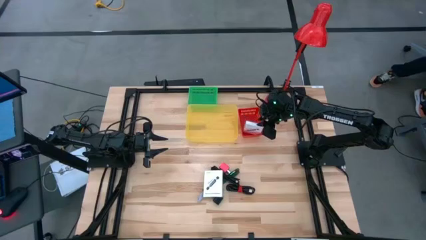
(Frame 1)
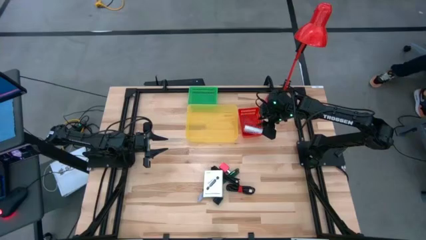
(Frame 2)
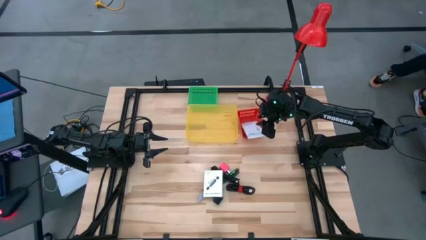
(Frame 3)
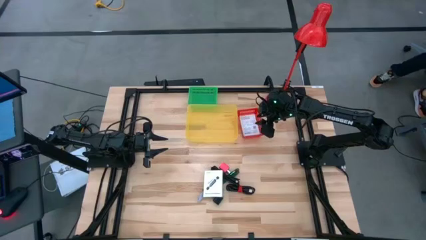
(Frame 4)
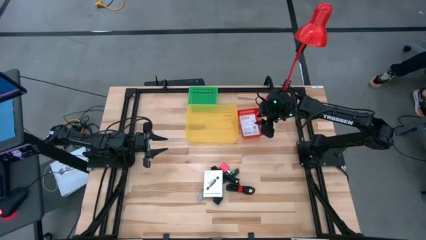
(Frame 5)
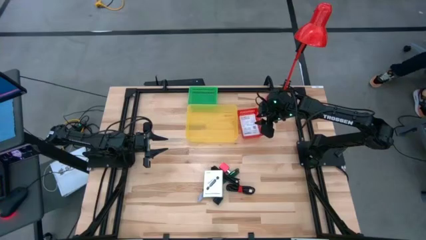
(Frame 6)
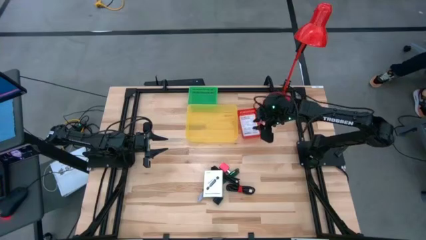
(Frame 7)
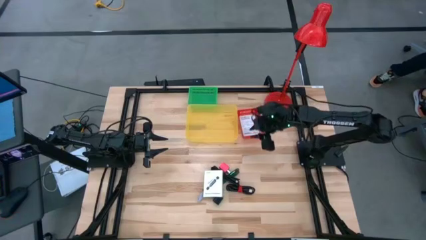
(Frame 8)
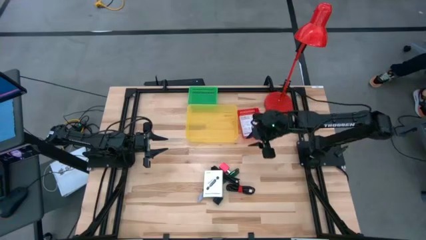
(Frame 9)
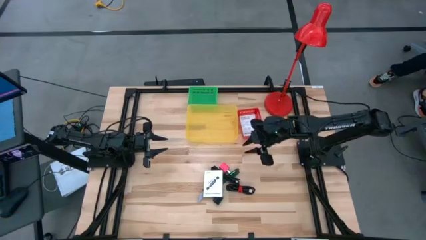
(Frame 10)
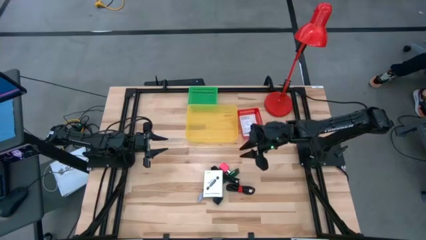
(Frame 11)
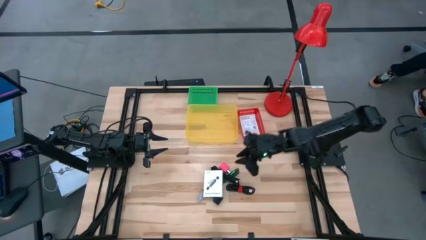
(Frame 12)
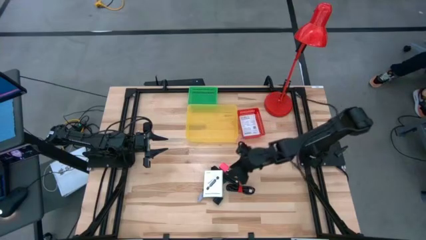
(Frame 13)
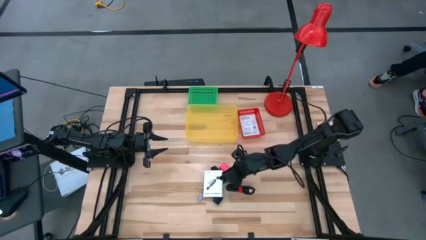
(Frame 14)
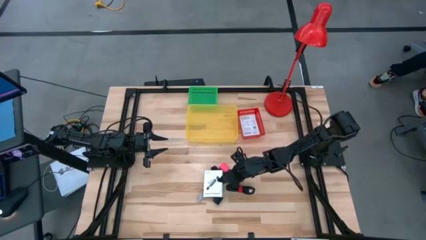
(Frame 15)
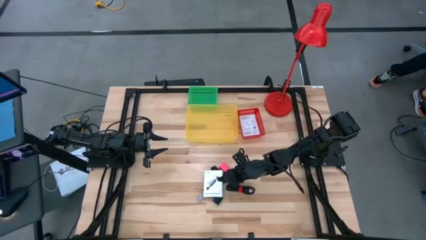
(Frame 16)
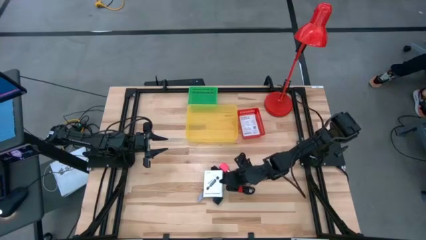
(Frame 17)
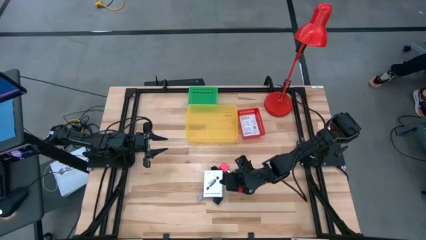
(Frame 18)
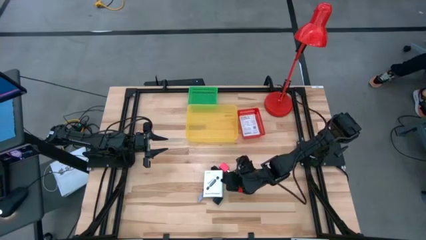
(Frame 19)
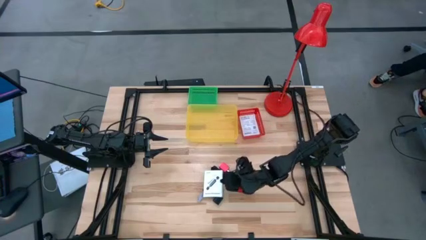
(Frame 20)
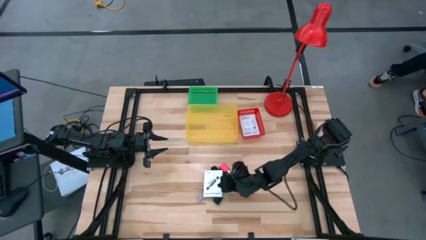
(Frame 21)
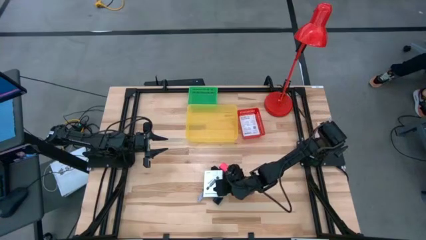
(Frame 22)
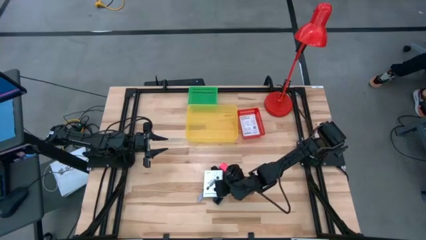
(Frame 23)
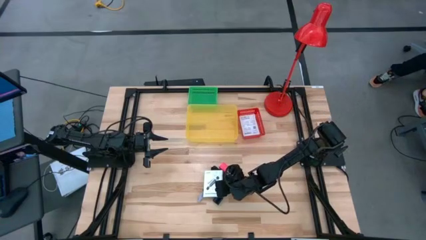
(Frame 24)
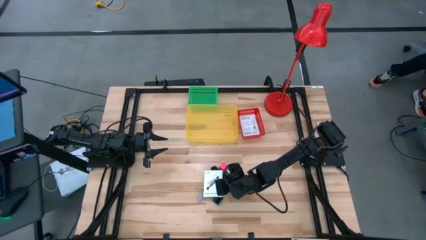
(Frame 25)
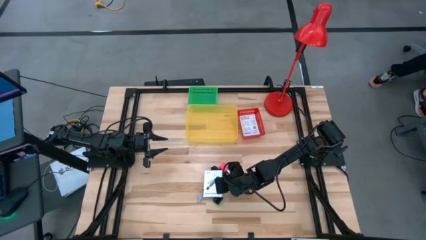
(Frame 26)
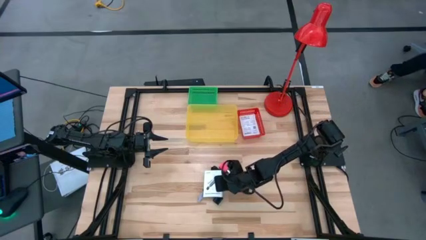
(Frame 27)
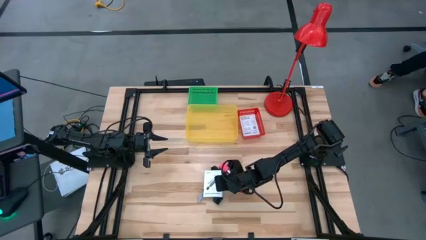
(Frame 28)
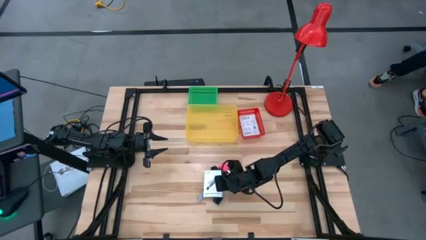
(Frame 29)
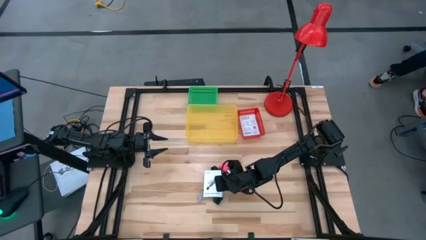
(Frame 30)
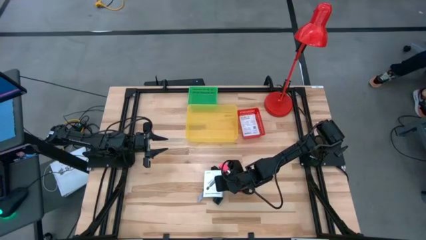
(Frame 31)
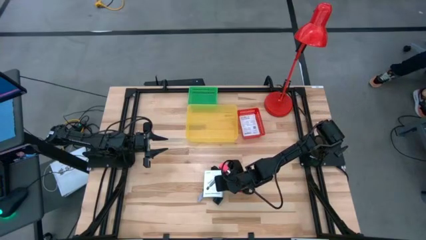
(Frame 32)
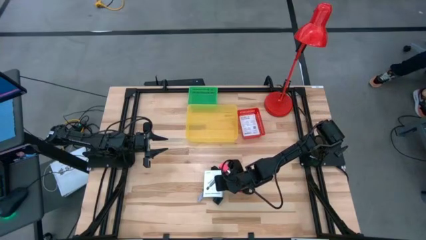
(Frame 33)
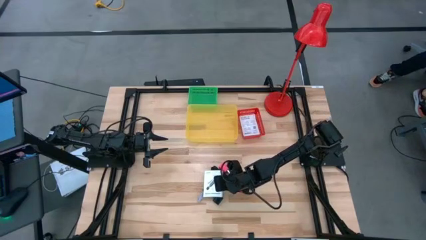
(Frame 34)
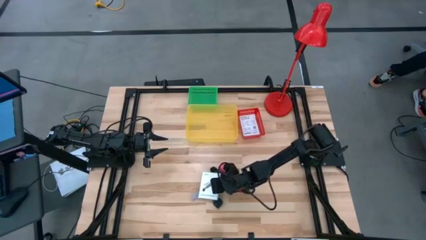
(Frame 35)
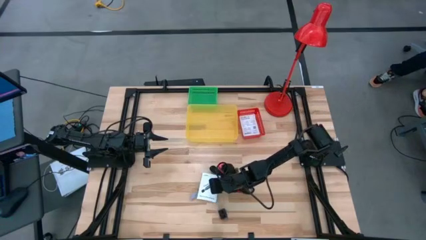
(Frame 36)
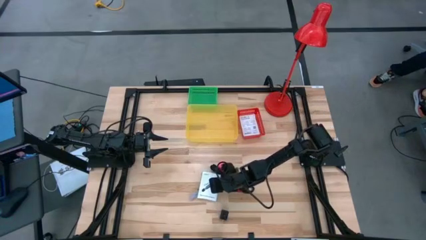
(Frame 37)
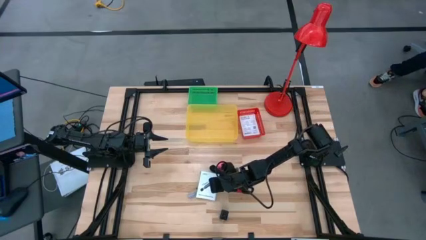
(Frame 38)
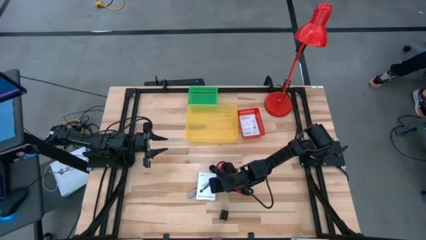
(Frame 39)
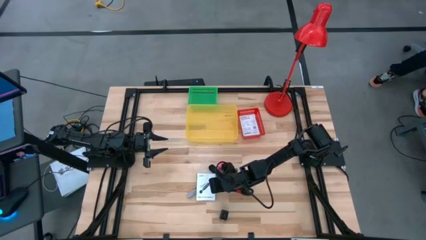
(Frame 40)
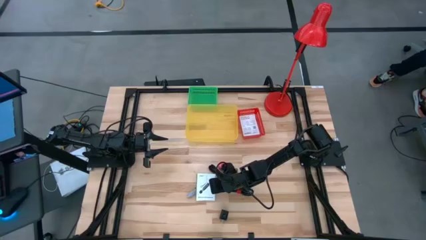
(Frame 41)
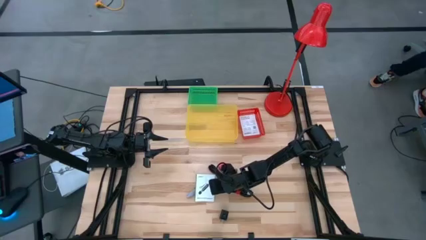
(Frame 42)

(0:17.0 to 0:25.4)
Task: Pick and place items into bin
Put the white card reader box into the red bin

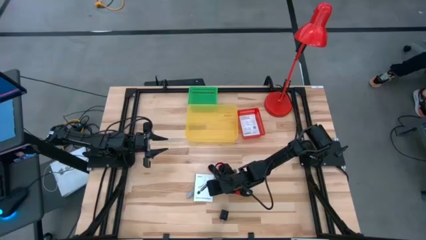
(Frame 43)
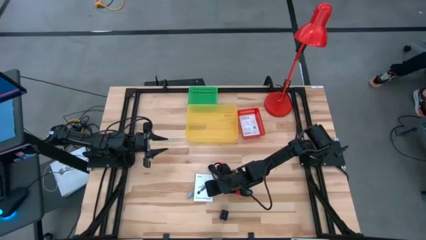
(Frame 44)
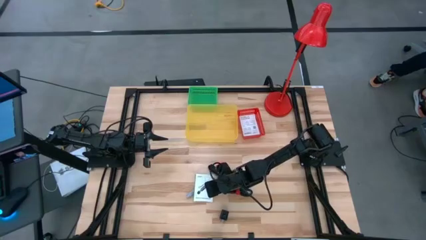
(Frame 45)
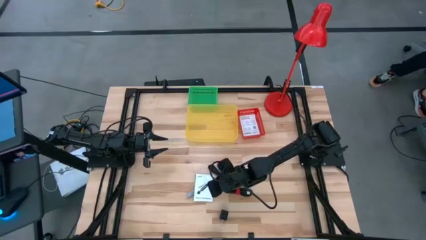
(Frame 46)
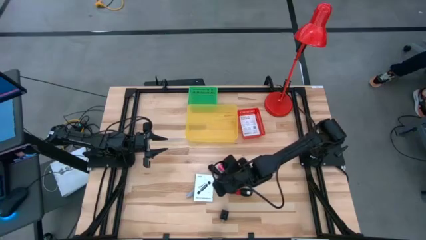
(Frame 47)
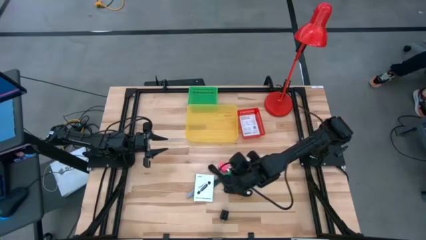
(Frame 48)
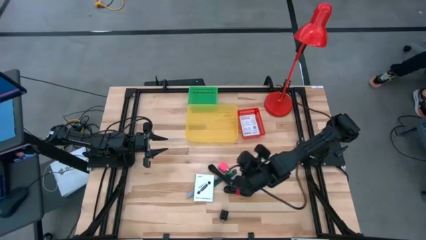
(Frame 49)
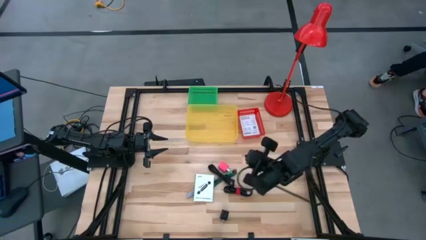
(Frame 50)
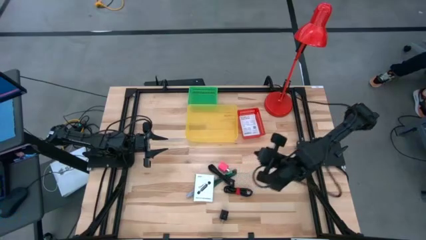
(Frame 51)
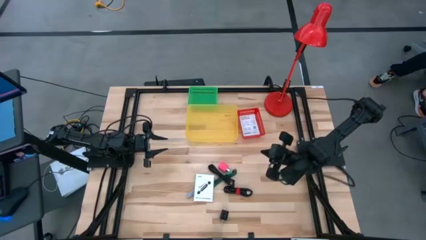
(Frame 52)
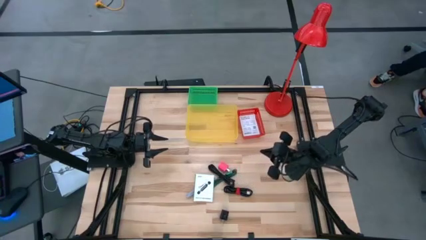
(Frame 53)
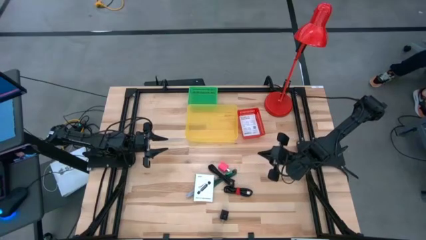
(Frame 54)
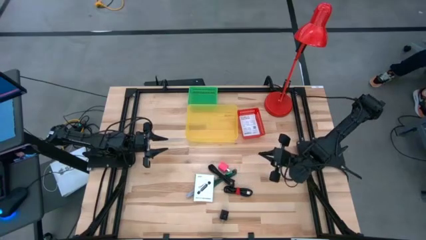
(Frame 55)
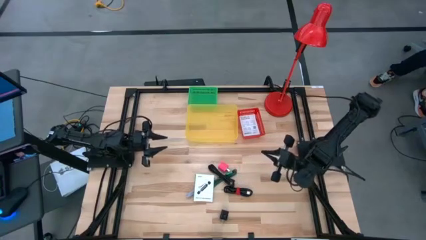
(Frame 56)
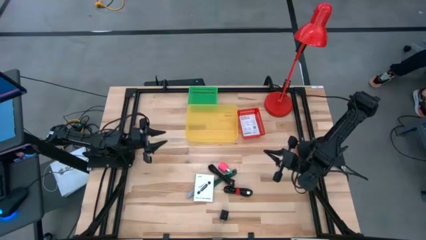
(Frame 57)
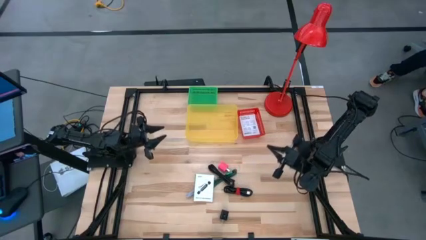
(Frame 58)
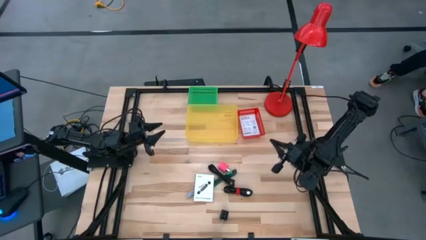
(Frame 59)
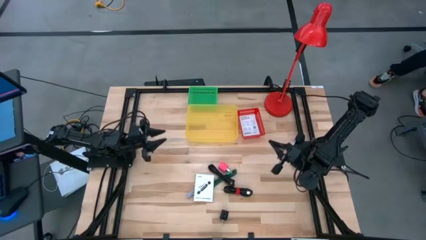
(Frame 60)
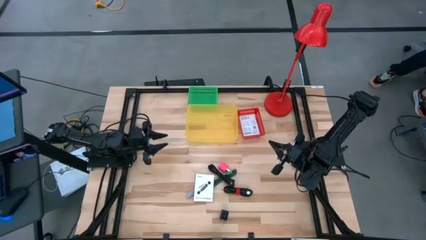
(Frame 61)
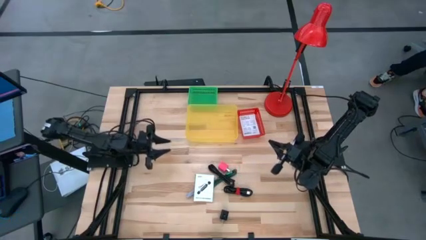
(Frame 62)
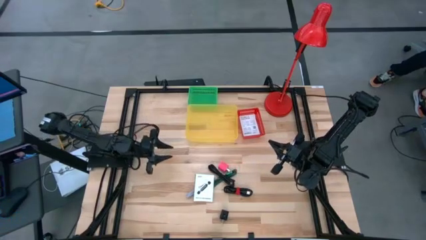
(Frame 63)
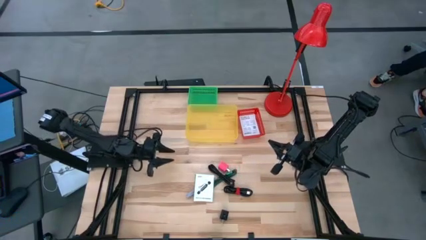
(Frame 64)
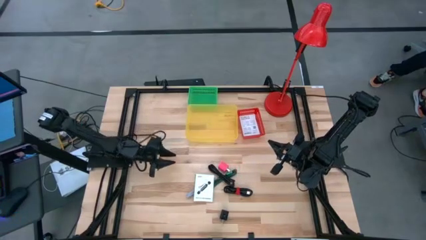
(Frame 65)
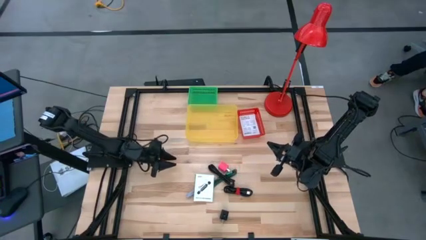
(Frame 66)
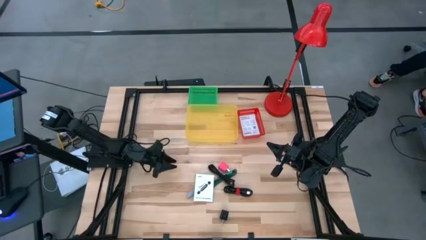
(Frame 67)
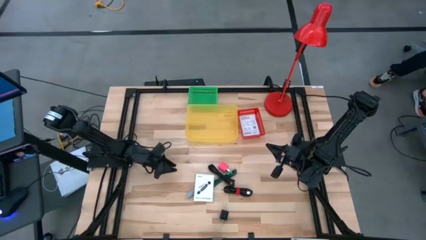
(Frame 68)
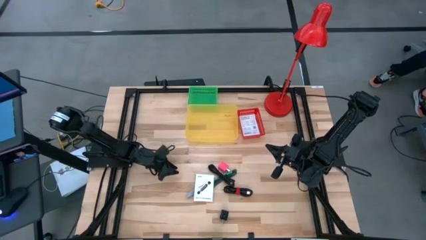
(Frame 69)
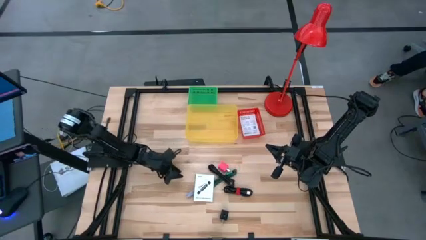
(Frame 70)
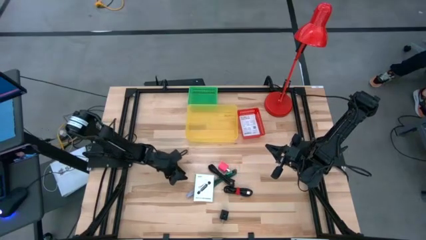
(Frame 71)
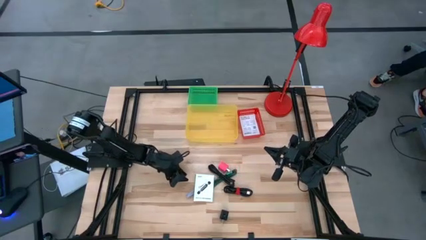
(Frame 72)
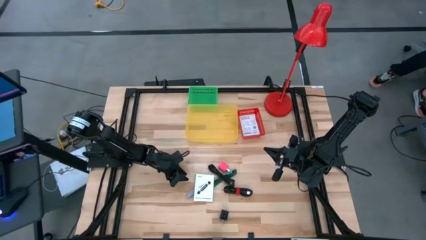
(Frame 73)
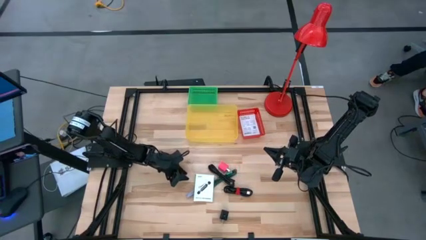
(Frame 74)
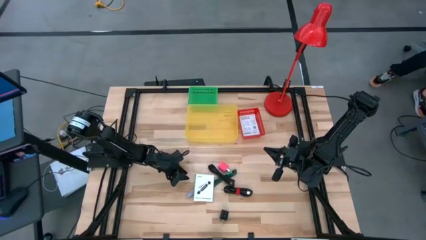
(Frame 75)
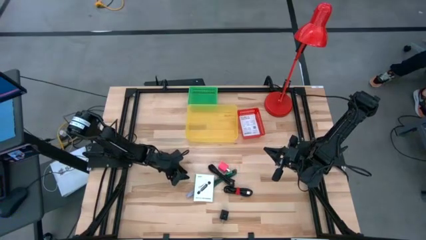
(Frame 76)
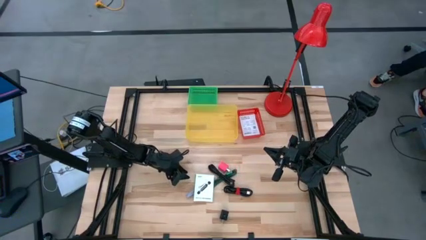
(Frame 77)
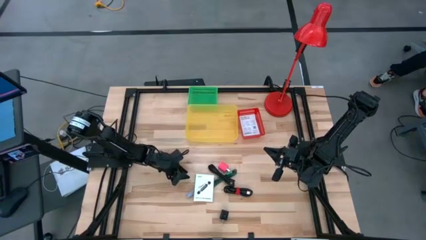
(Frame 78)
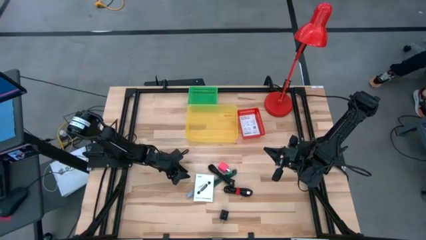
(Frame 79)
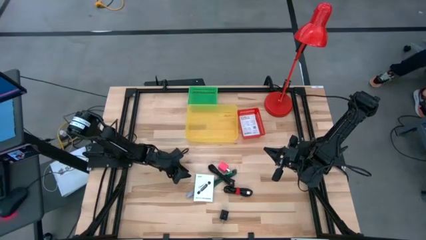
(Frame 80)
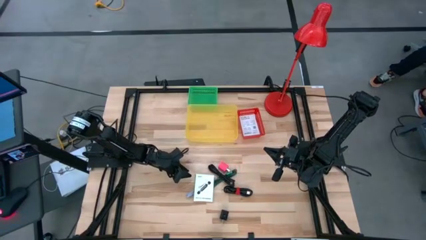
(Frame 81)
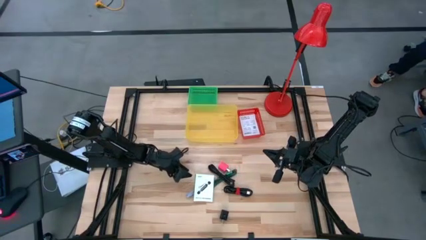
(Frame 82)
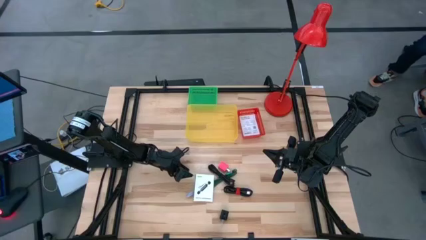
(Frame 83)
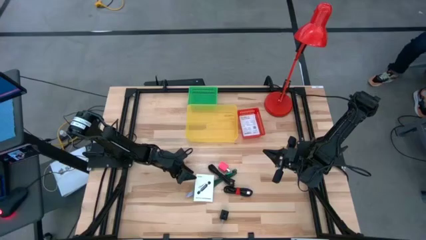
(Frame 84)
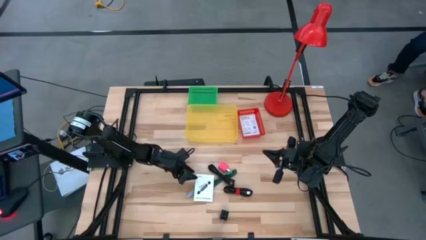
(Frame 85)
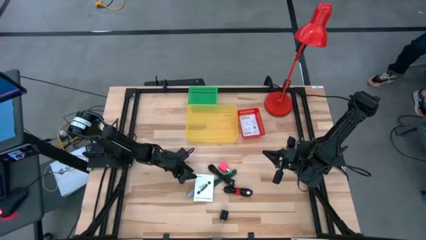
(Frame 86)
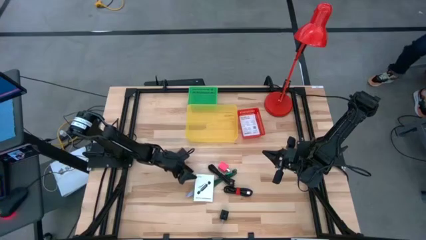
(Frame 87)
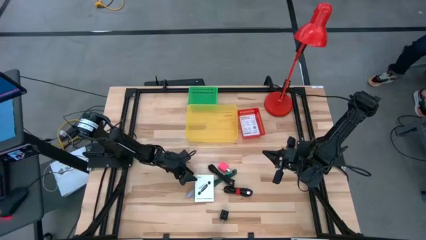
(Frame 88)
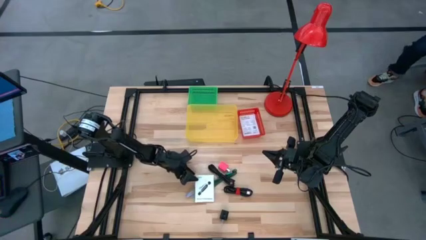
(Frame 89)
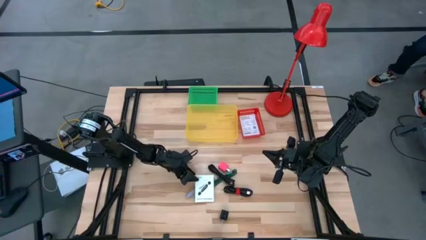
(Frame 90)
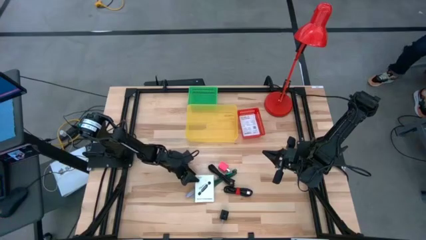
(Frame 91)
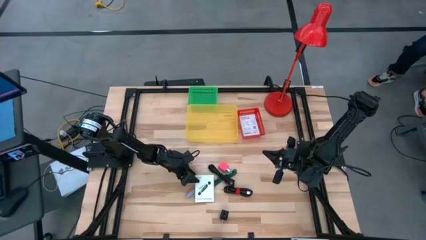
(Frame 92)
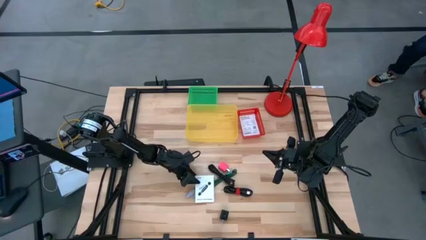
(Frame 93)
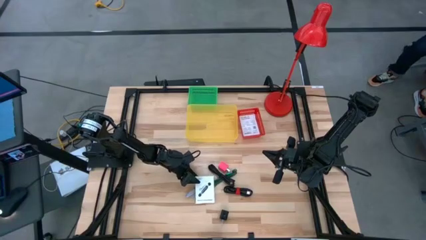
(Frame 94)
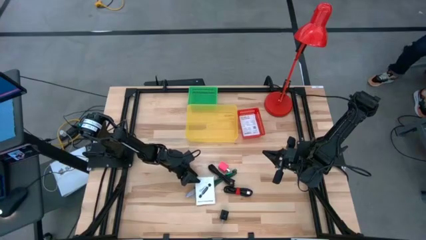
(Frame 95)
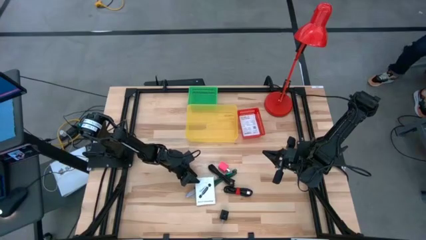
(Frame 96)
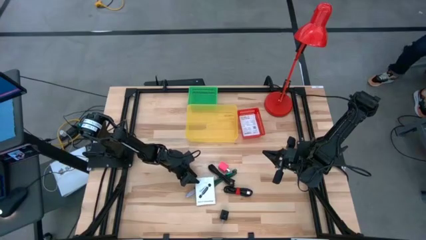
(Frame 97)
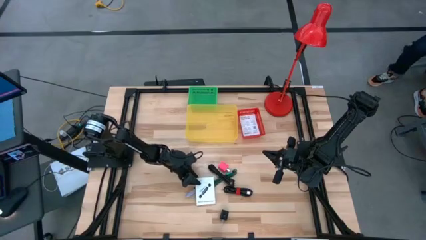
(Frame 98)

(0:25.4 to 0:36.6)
Put the white card reader box into the red bin
